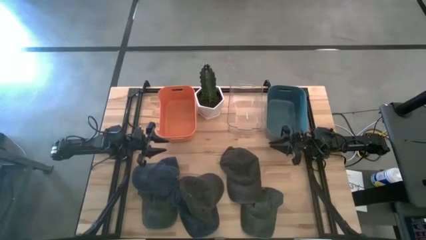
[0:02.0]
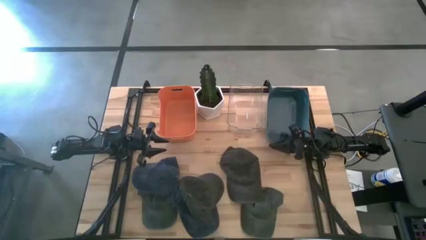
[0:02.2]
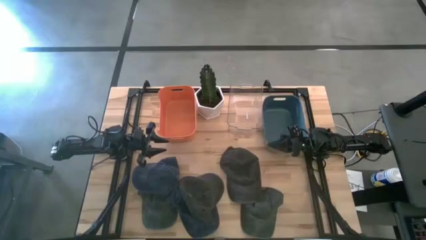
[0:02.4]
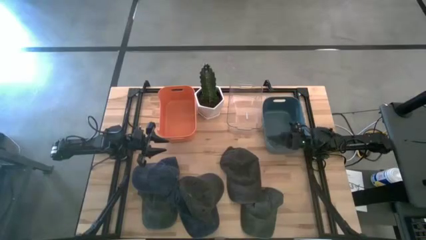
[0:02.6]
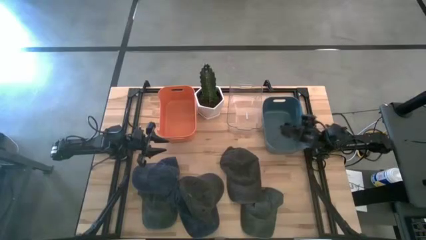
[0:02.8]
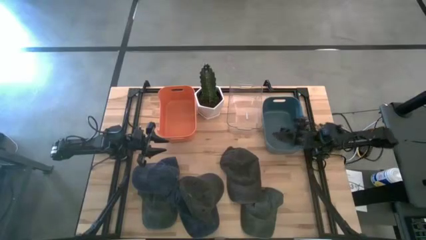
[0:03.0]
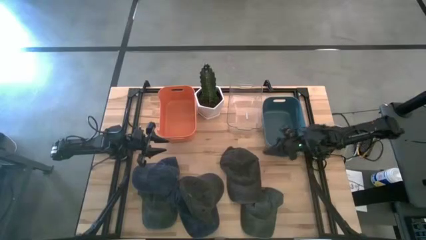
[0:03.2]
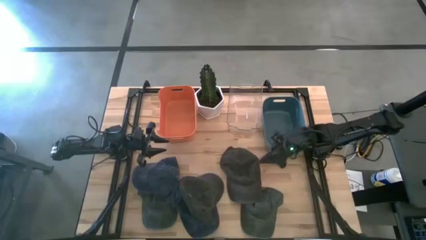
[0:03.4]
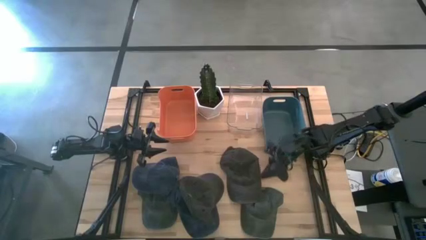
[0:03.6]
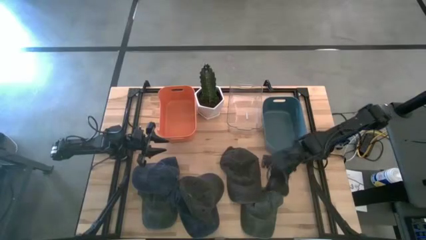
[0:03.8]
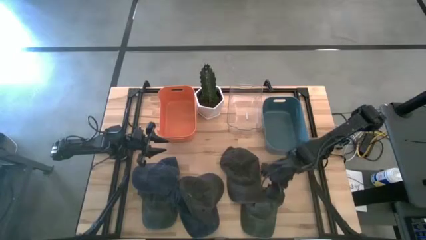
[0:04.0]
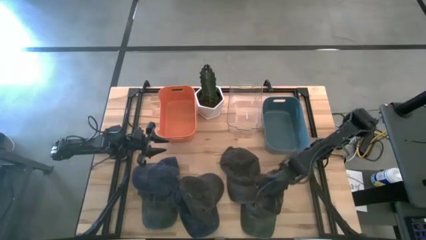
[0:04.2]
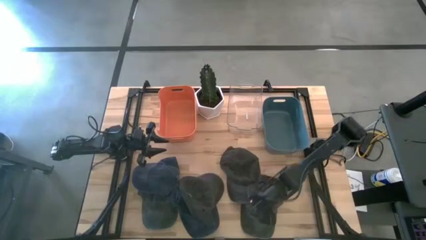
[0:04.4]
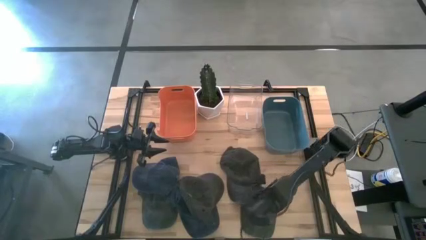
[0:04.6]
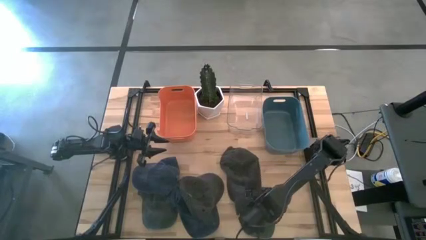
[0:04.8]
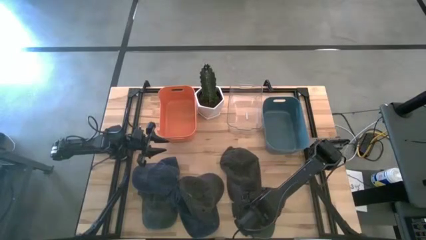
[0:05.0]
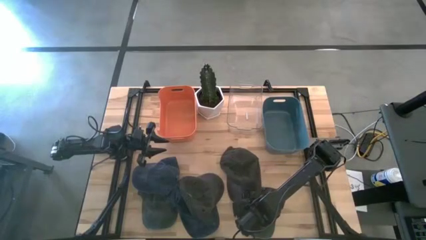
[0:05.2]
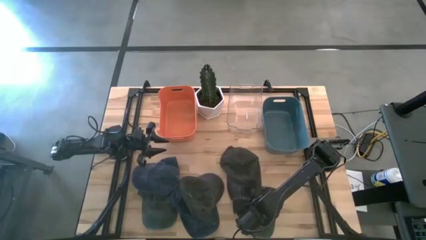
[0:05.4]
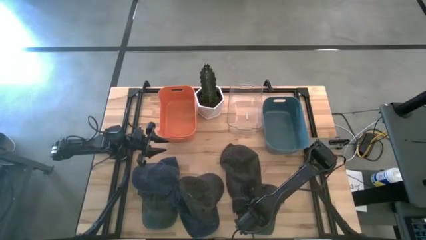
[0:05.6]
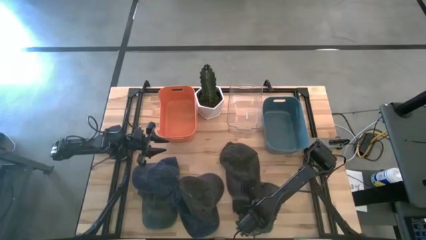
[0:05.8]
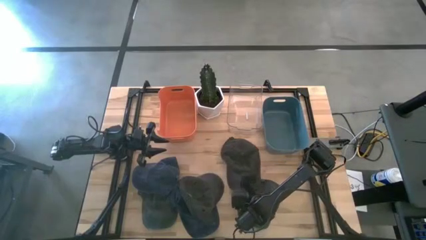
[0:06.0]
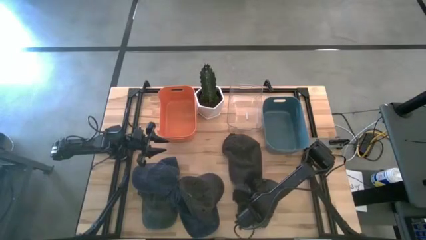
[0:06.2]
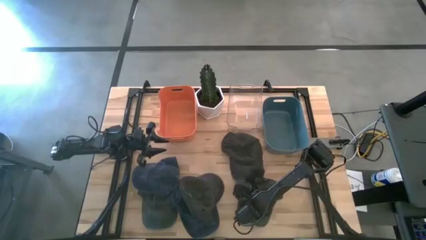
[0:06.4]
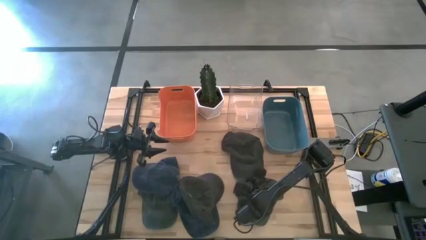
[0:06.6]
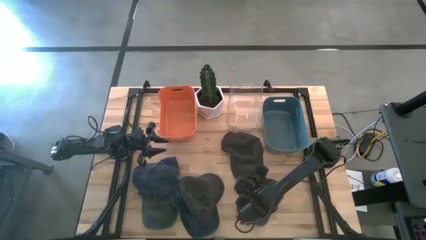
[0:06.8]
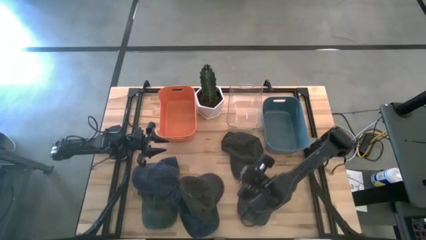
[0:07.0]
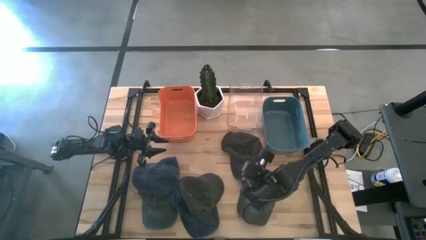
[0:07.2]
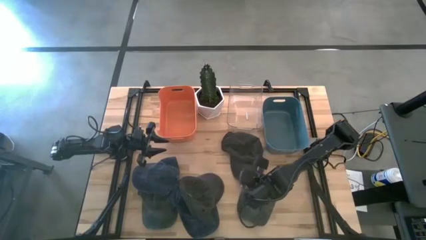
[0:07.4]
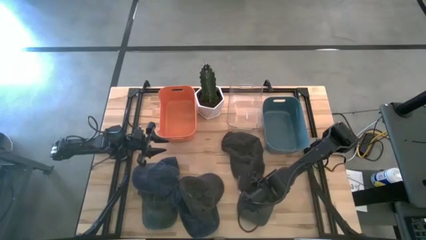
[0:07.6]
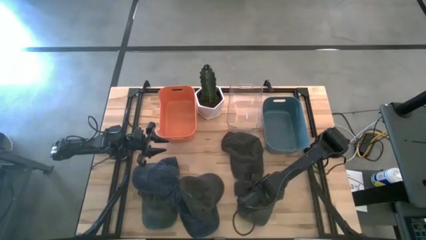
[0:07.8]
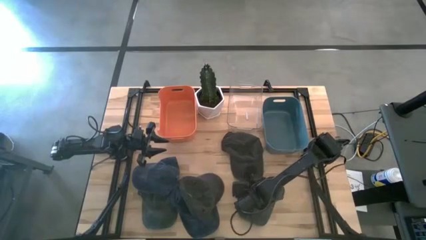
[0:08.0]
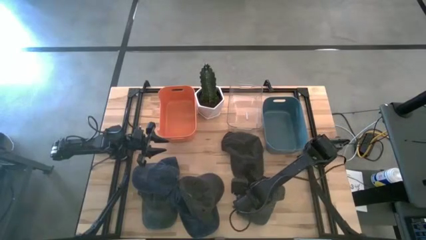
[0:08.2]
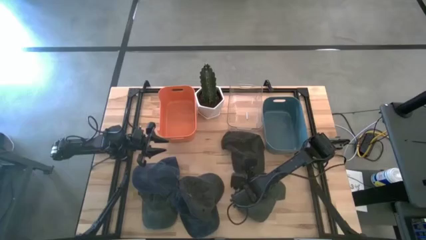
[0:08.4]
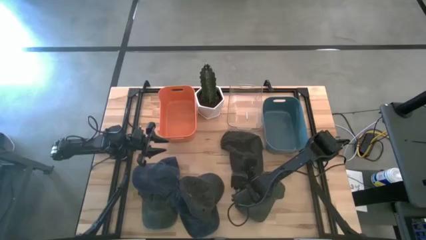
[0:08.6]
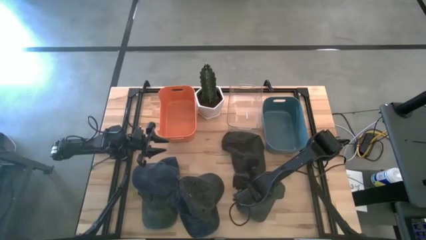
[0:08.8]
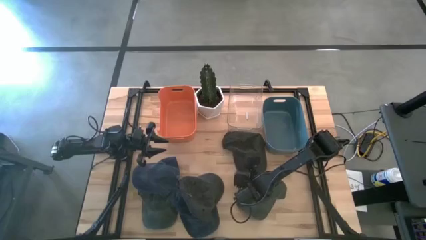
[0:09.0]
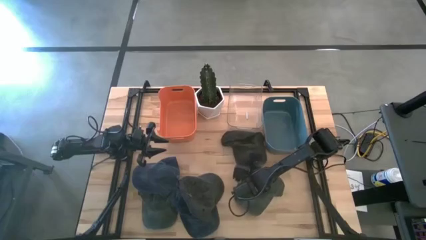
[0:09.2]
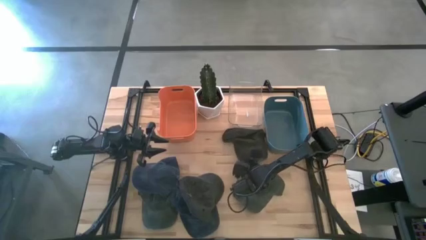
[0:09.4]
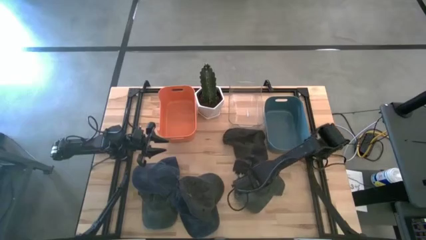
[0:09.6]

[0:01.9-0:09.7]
Task: Pick & Place hat
Put the right black cap into the blue bin

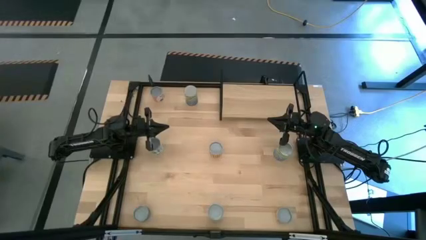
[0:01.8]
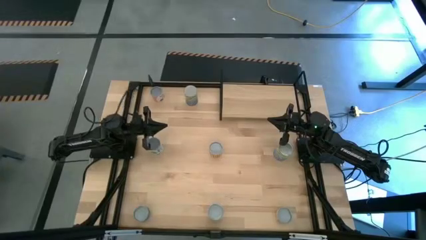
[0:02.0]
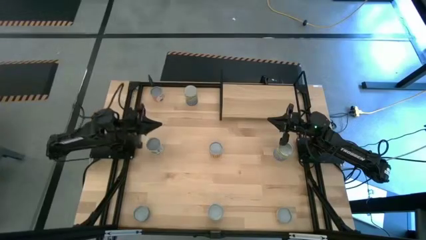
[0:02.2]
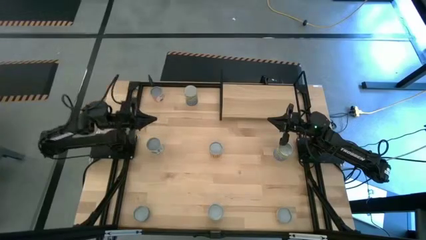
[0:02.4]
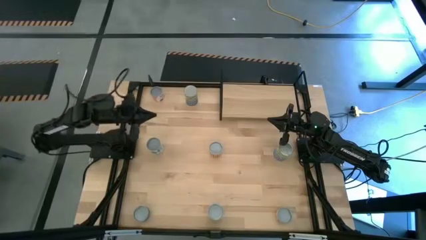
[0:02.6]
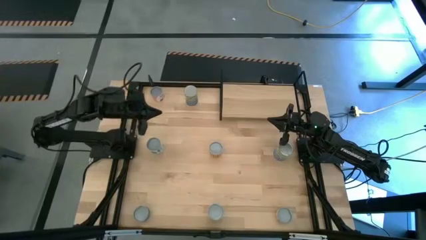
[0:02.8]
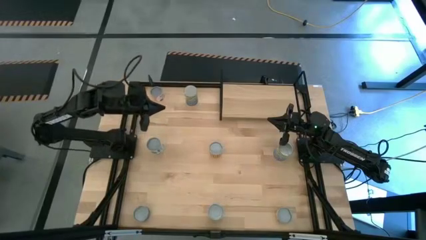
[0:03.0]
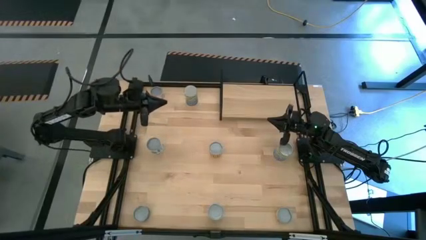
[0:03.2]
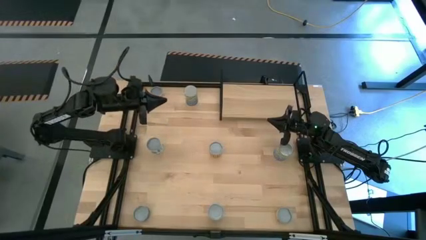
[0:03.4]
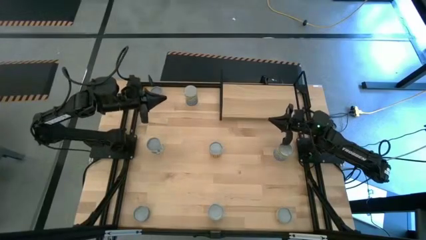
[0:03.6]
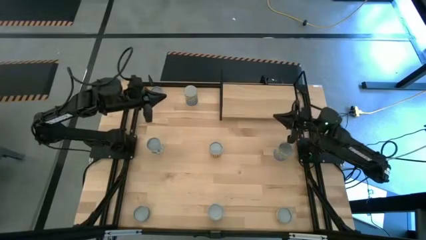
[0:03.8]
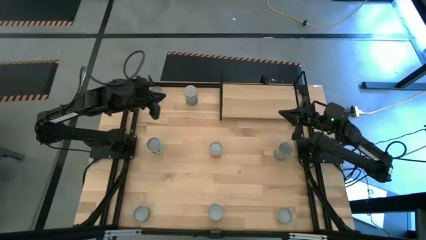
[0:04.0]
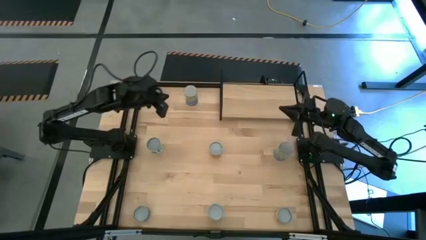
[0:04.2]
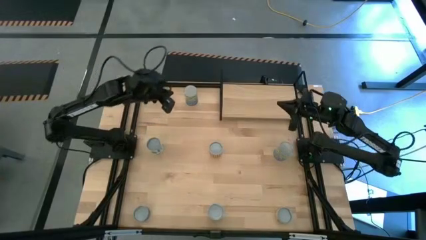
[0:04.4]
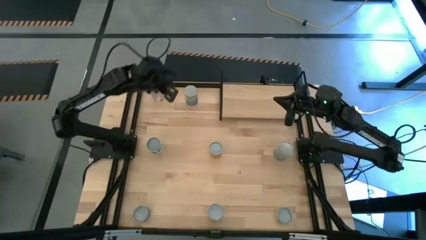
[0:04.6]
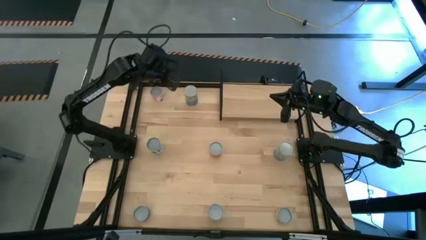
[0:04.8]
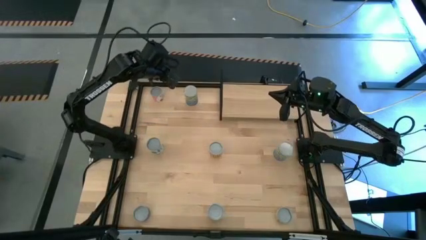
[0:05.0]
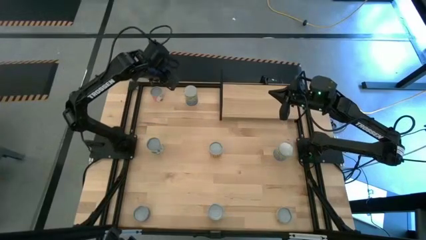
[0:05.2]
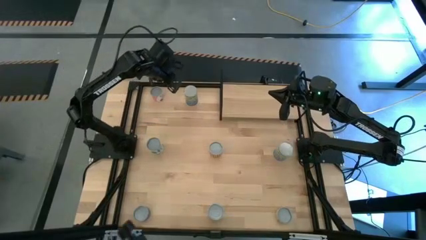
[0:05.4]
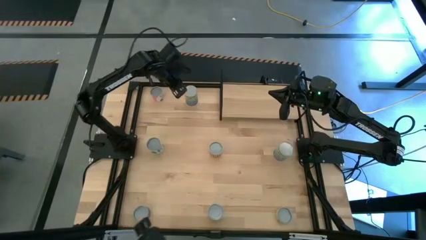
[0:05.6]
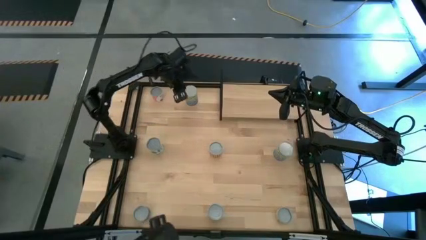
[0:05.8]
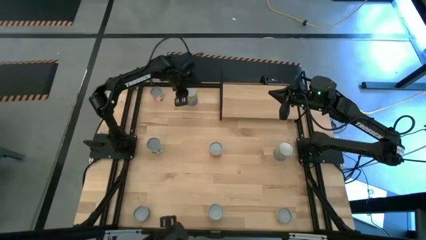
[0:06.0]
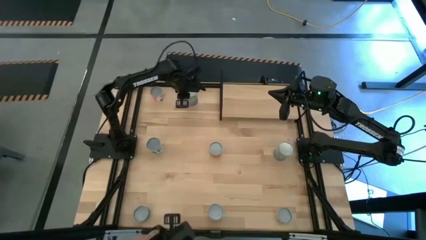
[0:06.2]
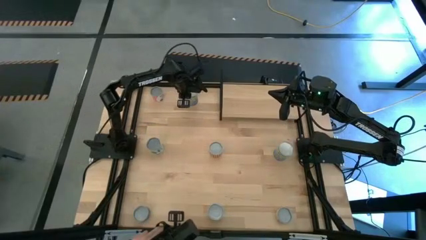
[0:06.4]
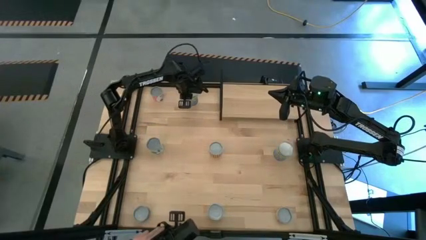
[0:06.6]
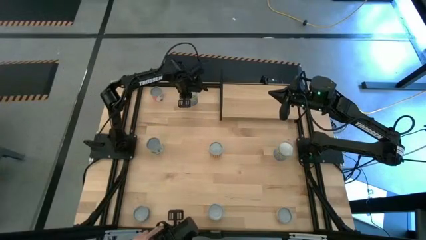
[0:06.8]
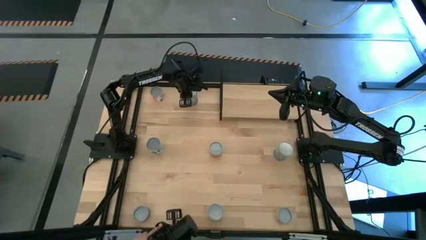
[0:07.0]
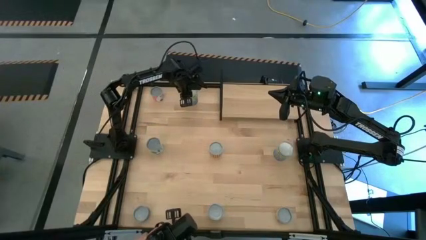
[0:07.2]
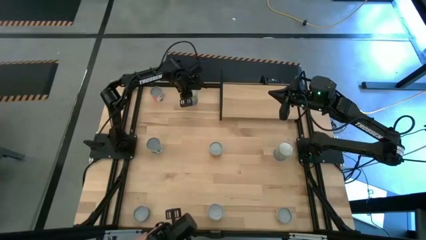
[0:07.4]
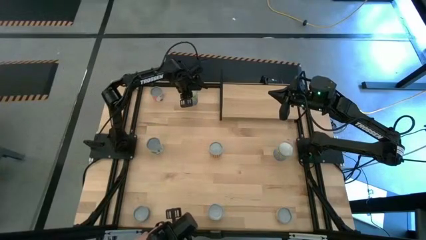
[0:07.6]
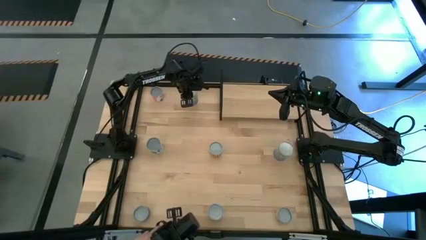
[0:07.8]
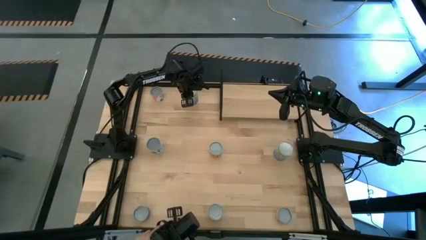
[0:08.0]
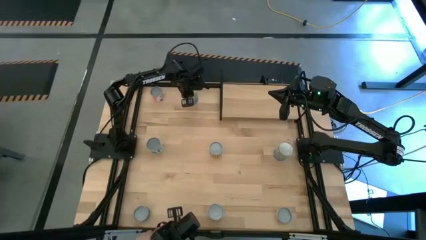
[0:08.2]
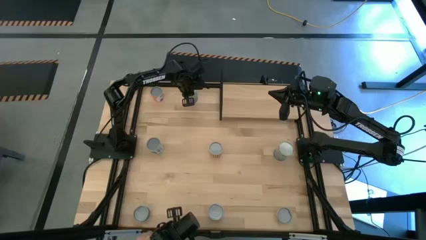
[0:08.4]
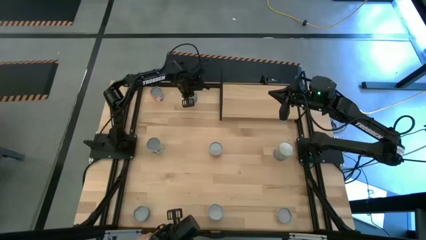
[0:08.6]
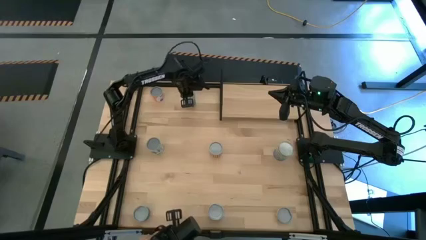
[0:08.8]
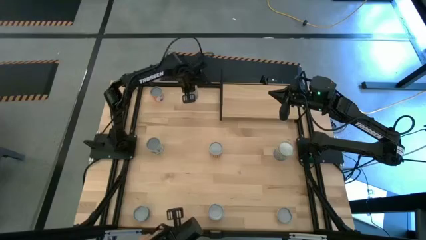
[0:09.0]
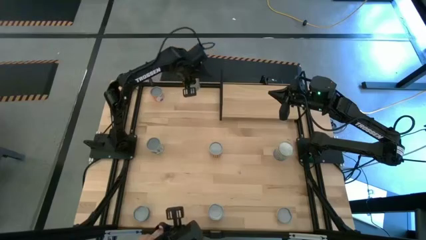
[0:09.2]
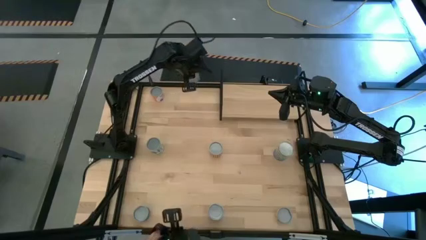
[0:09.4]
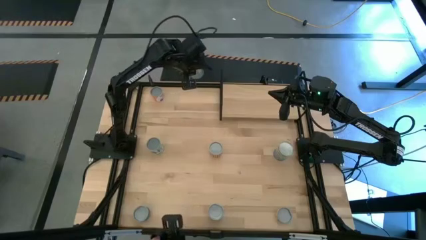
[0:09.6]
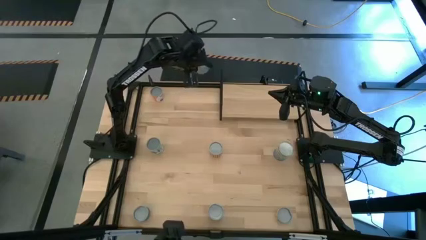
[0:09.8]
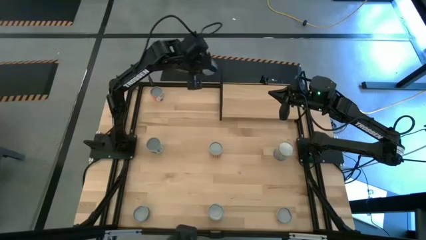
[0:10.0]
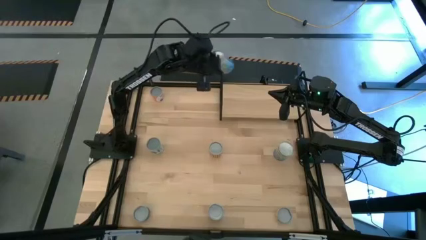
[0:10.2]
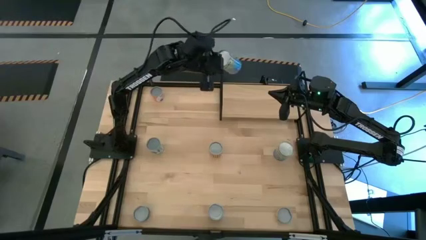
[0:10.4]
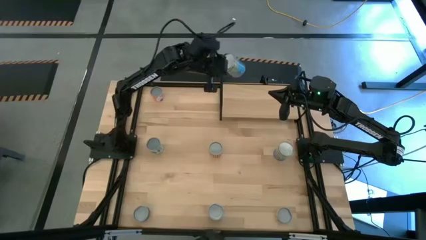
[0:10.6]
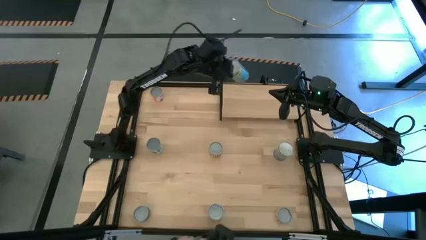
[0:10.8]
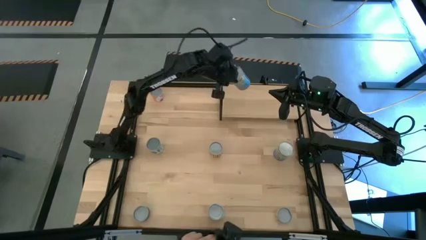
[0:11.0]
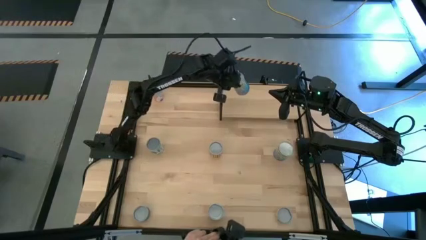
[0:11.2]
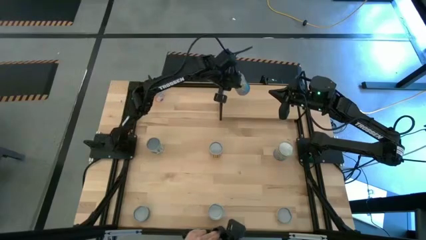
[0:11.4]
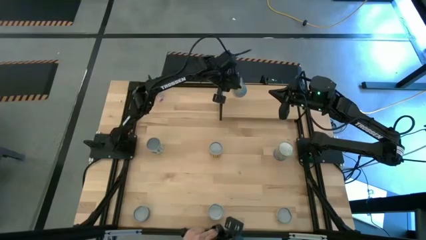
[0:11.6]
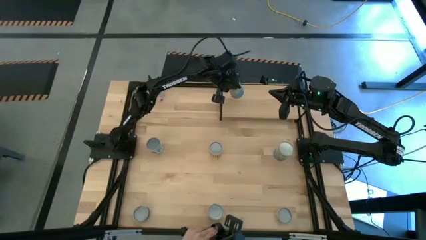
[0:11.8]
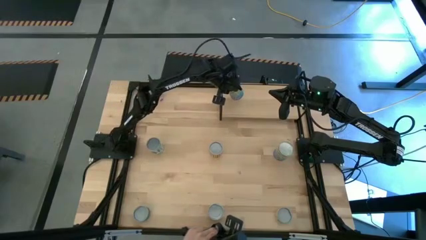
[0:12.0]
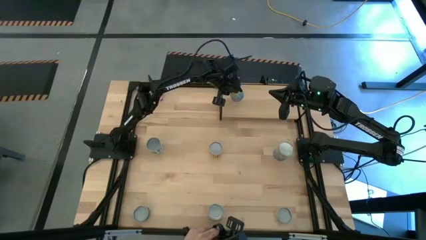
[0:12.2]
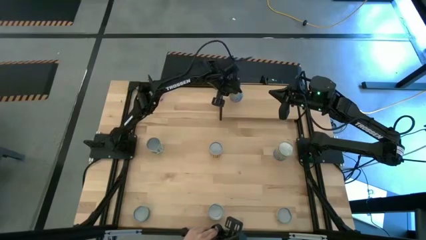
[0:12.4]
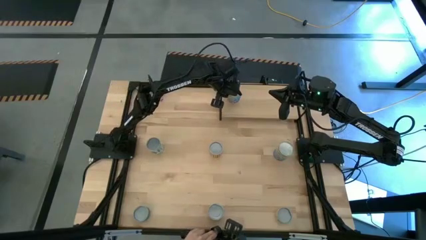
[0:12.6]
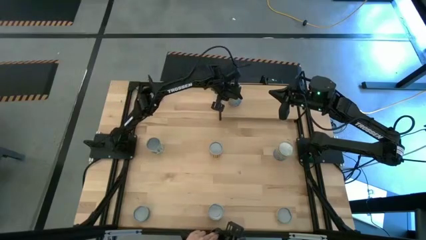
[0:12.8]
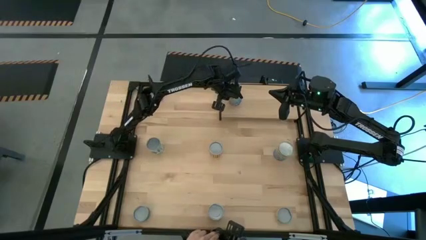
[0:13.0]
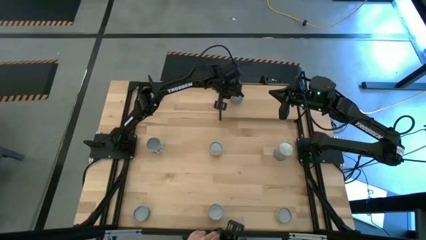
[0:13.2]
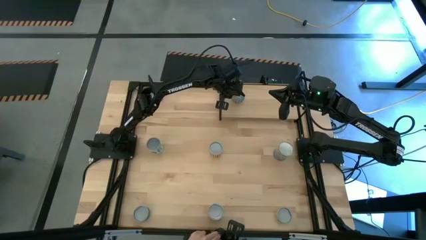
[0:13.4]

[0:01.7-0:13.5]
Task: Pick and place cans onto a shelf
Put the top canned cherries on the shelf
